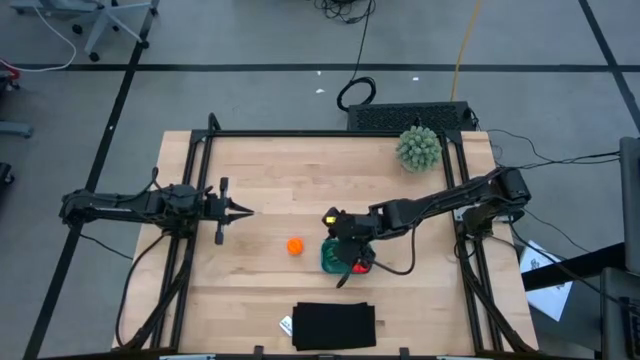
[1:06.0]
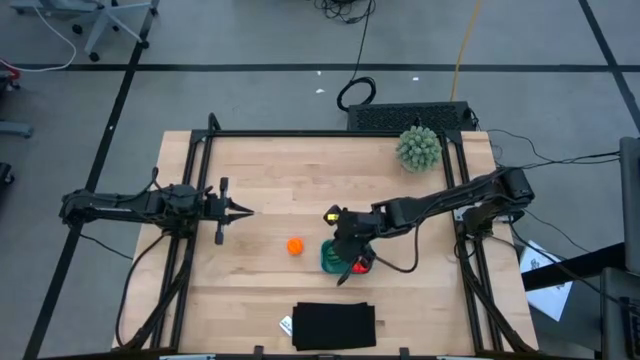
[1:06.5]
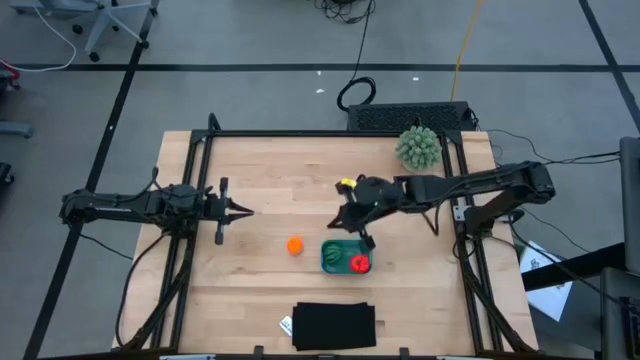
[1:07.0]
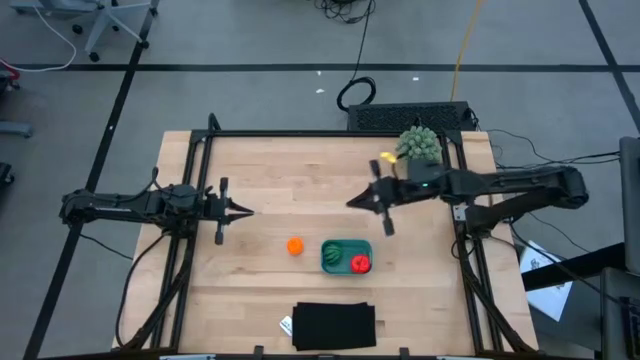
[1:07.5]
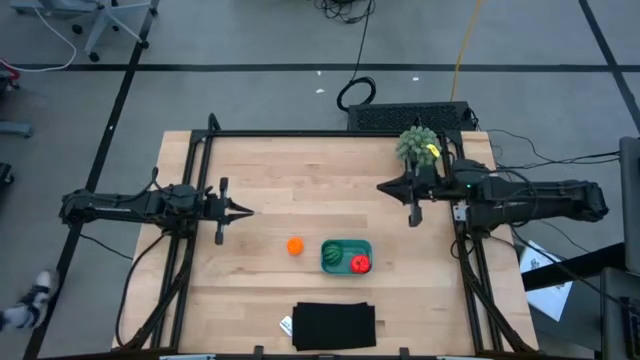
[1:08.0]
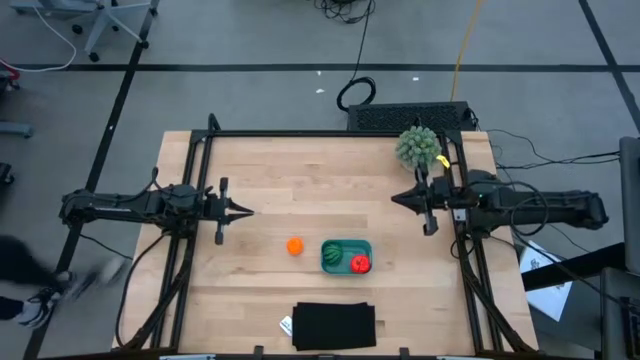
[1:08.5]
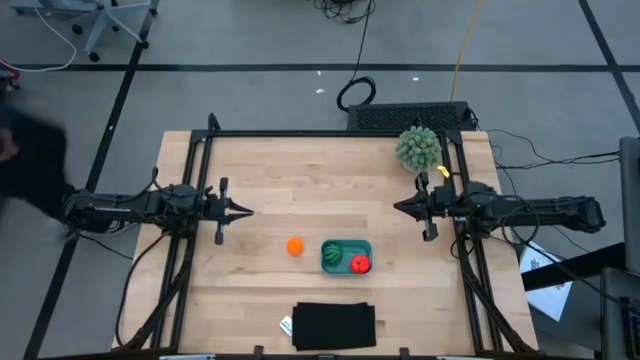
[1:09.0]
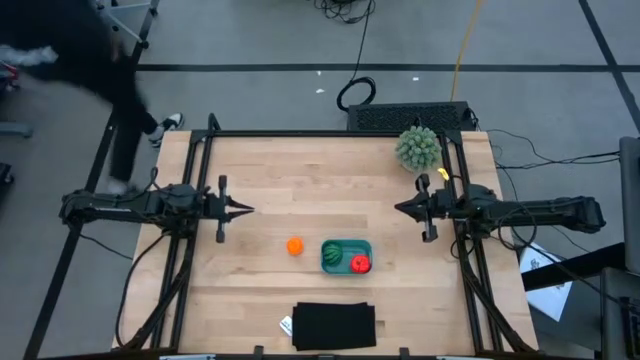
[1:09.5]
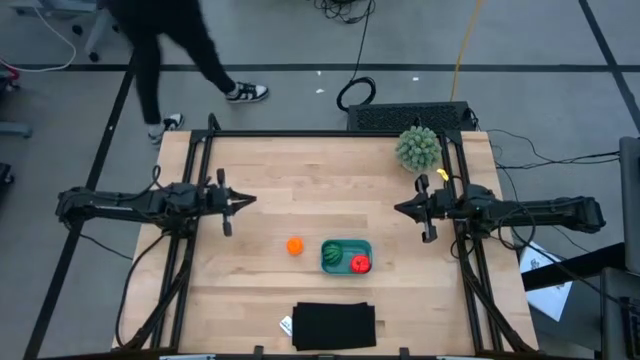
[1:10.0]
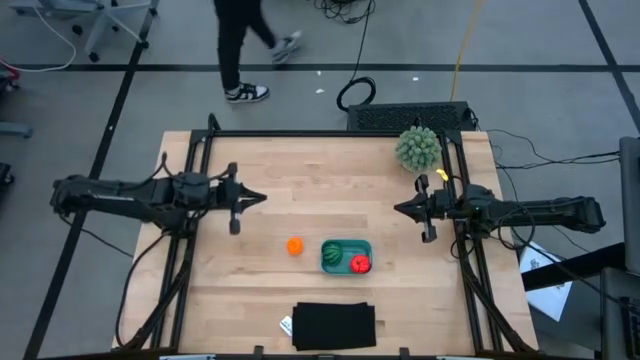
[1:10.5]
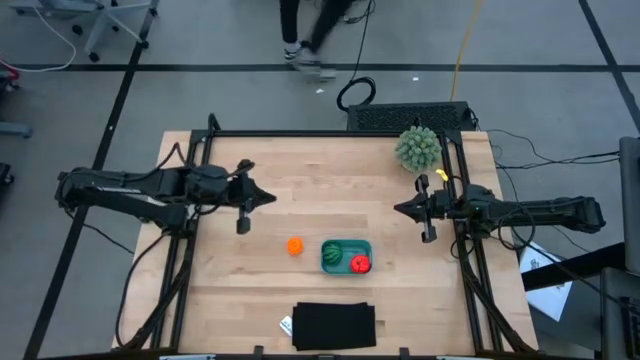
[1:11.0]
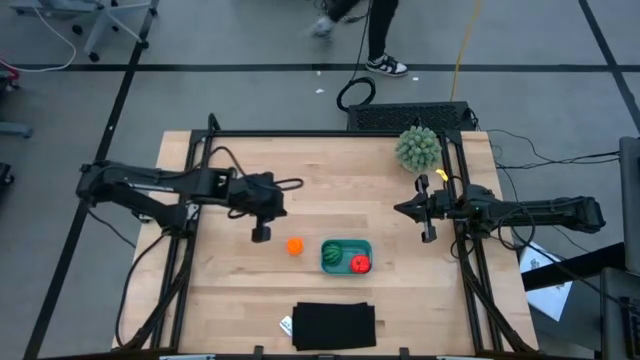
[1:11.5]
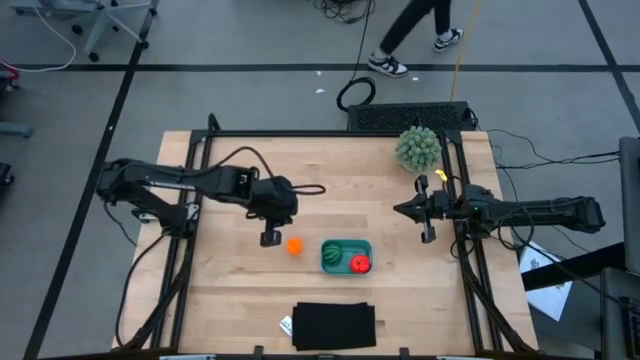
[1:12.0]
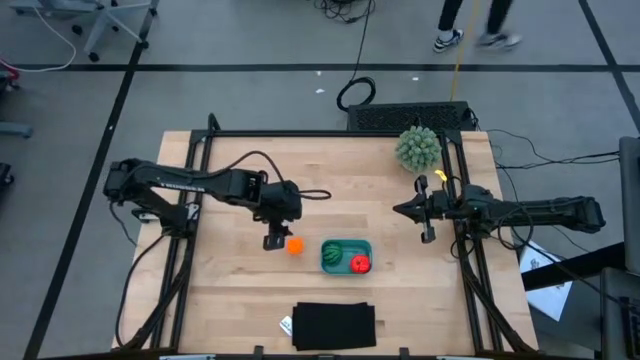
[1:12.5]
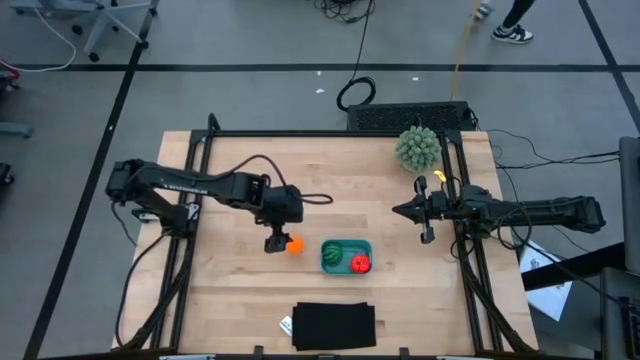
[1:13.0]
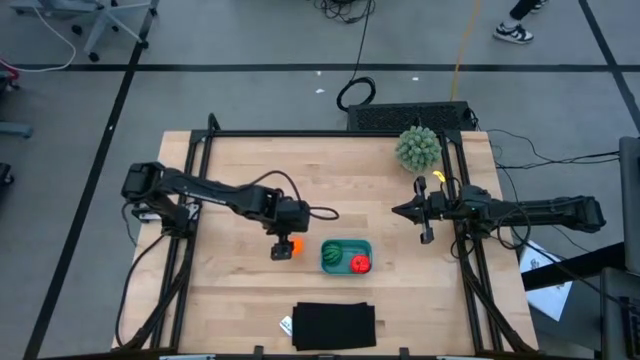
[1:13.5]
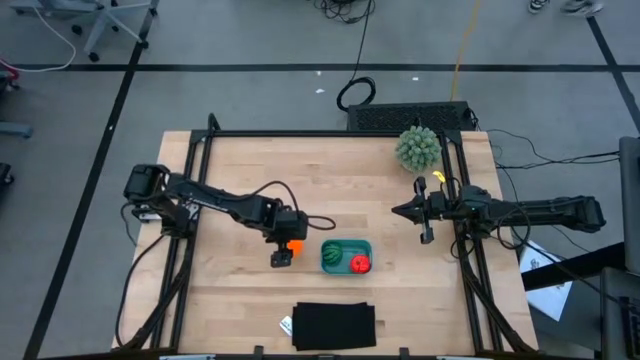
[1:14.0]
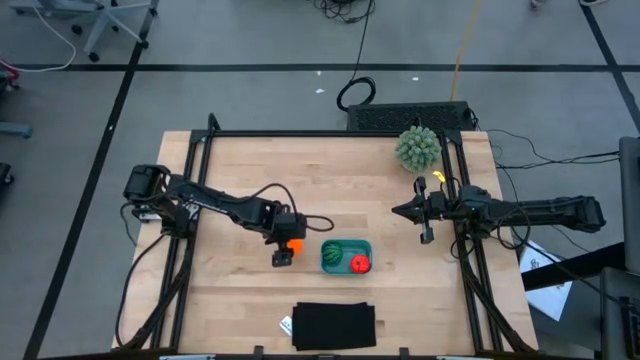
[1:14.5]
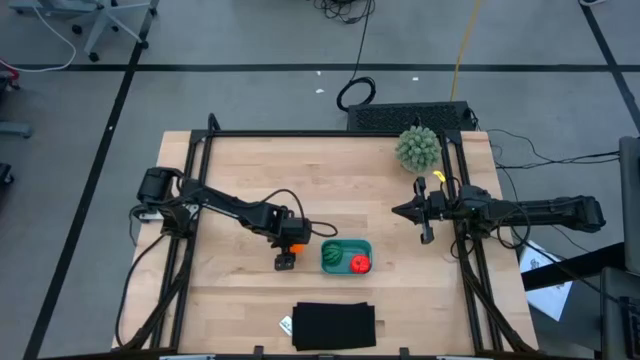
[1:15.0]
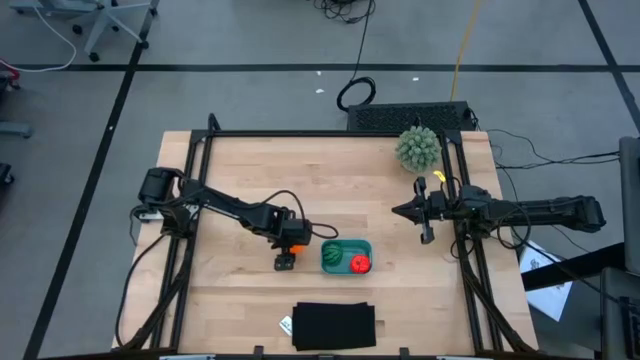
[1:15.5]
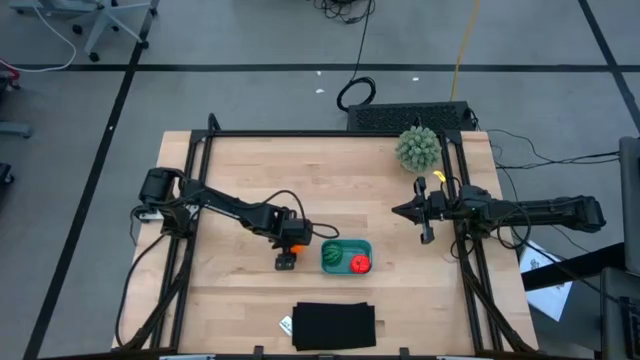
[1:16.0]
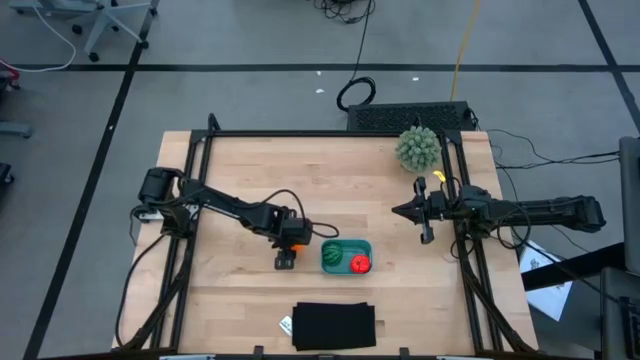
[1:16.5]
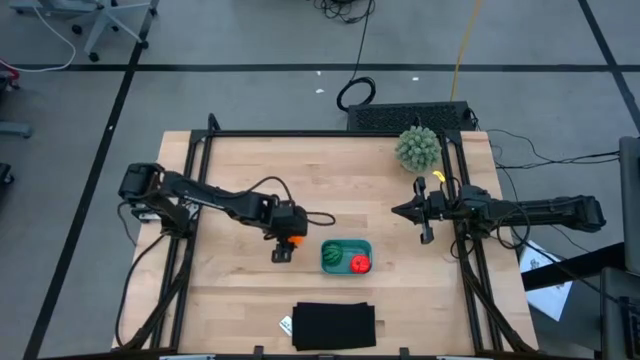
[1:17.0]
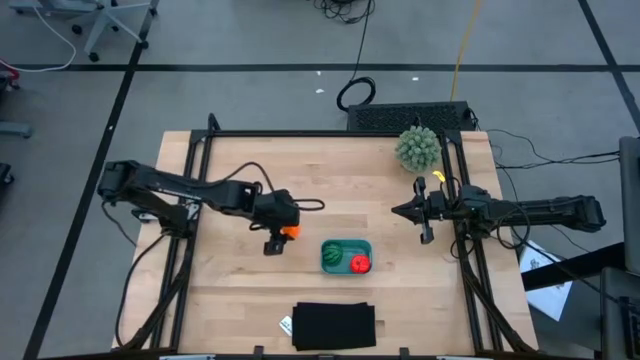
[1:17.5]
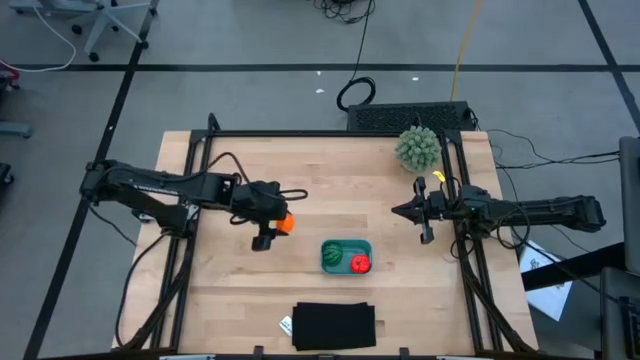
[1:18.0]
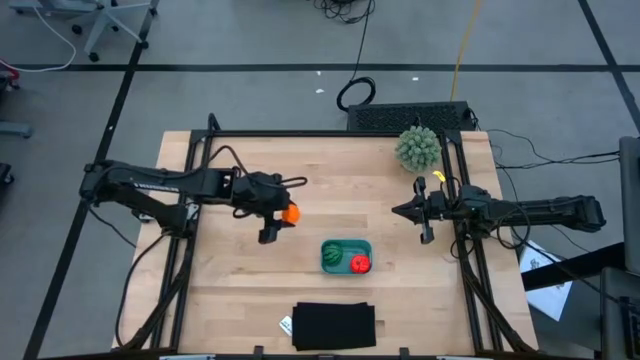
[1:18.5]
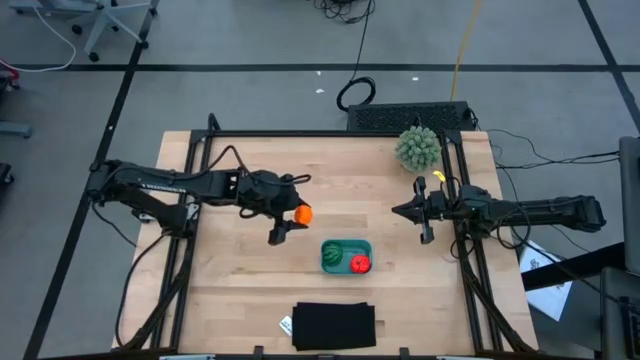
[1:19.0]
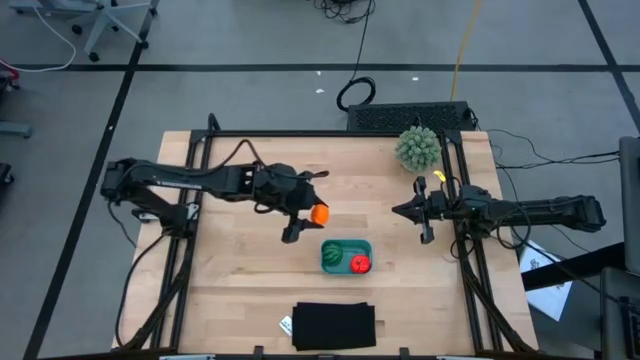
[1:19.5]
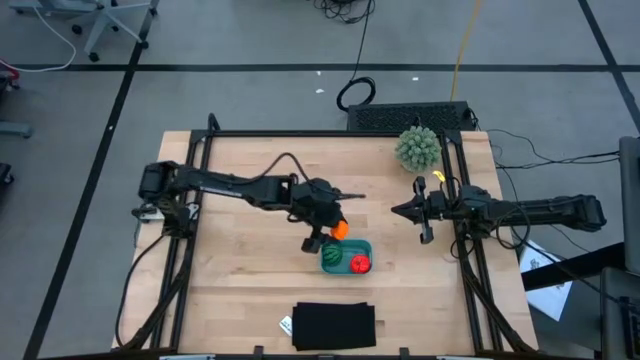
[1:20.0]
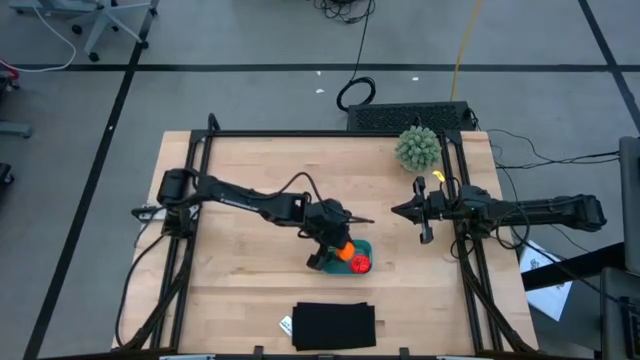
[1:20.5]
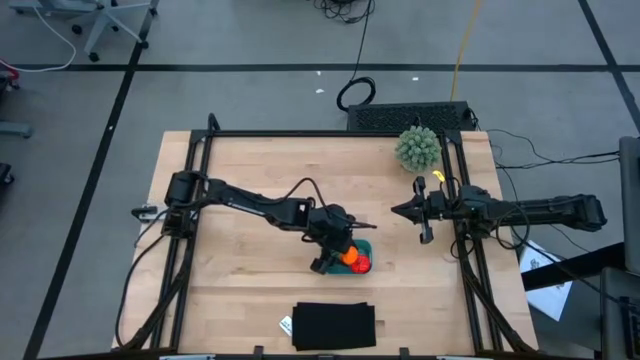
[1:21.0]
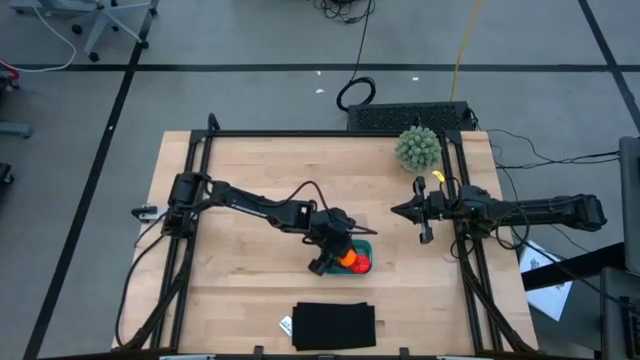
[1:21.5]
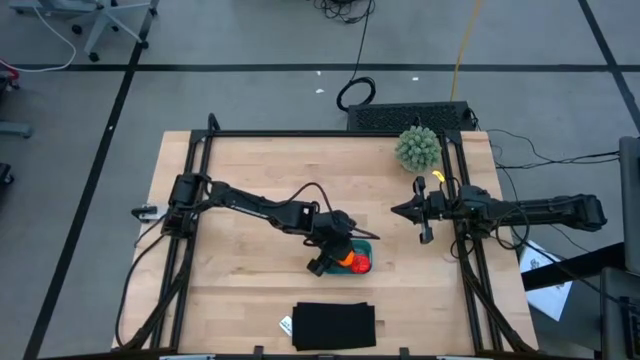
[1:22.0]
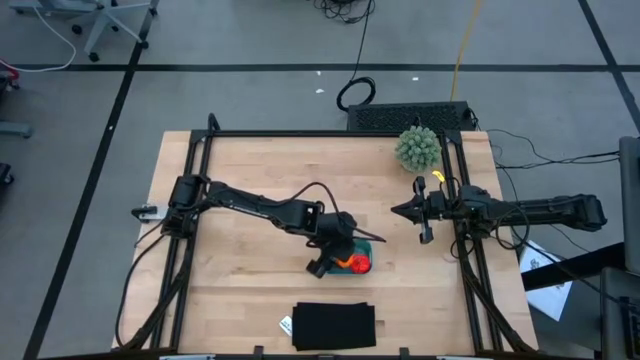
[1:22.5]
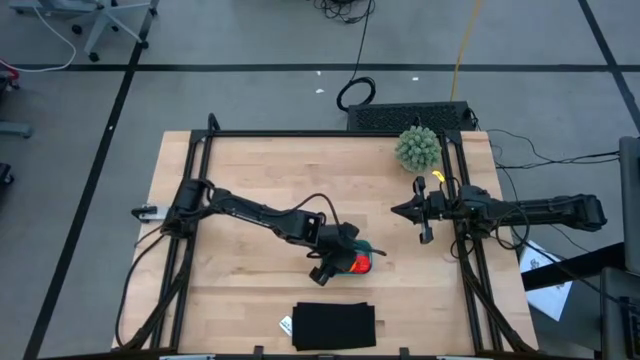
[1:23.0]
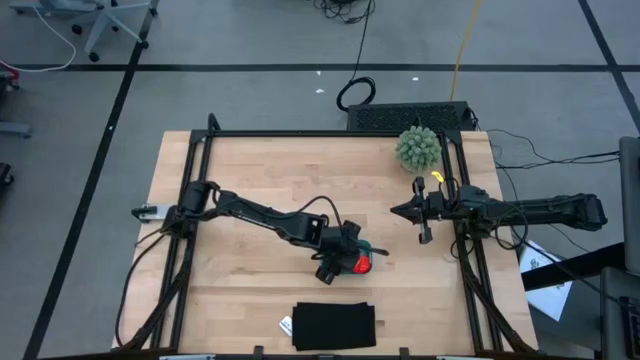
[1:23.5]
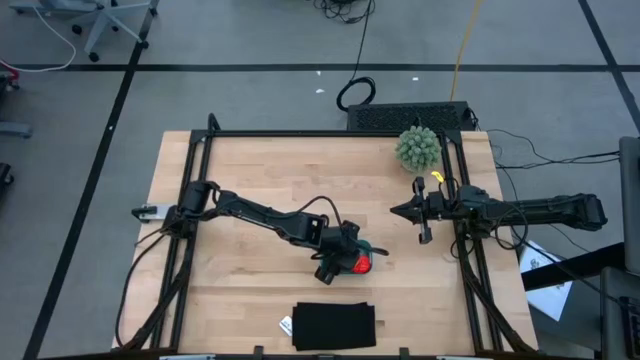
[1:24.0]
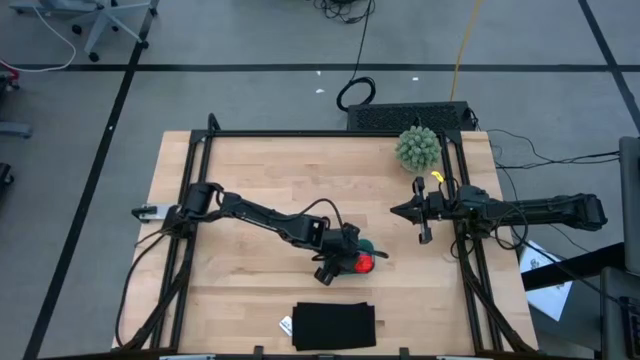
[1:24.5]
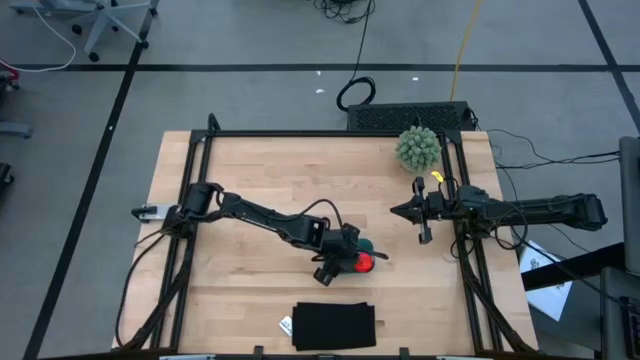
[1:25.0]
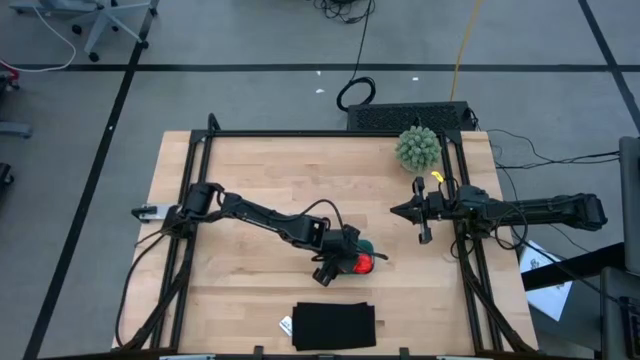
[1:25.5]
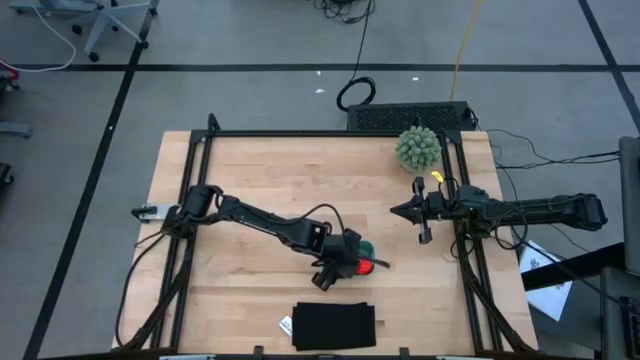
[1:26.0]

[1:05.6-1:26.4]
Task: Pick and placing Produce into tupperware
Put the pumpkin into the blue bin
